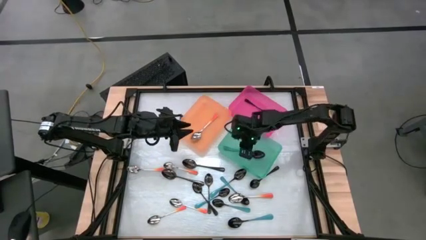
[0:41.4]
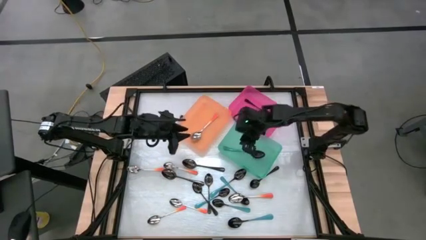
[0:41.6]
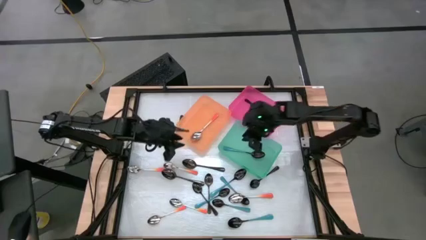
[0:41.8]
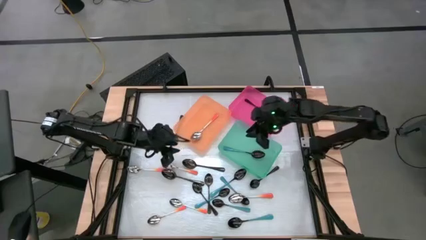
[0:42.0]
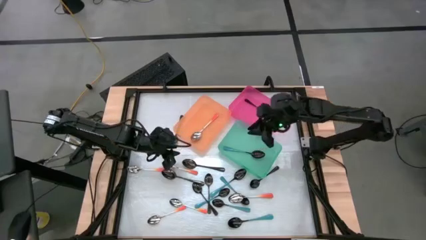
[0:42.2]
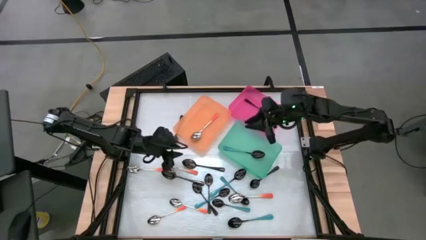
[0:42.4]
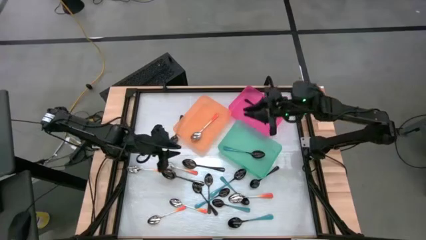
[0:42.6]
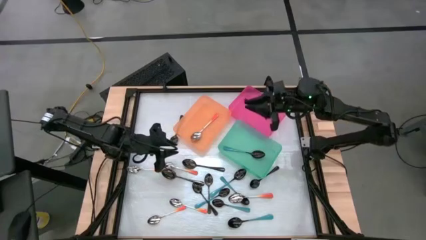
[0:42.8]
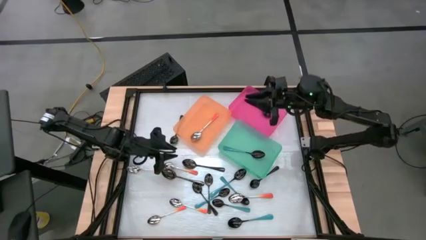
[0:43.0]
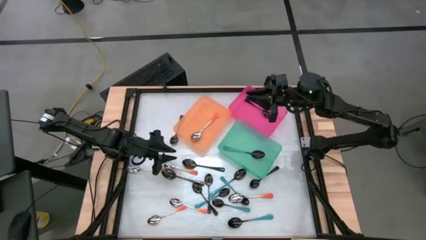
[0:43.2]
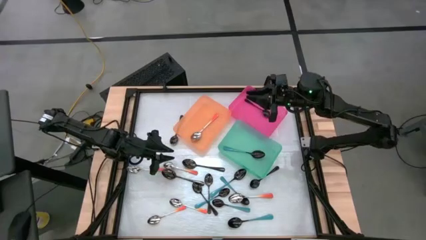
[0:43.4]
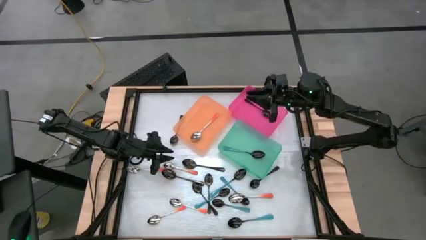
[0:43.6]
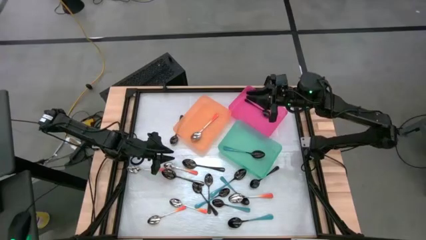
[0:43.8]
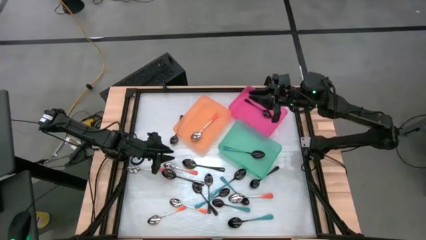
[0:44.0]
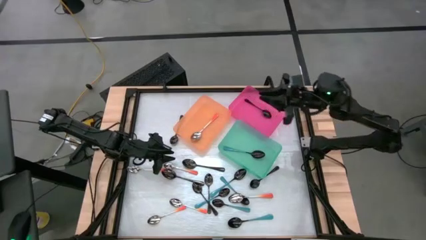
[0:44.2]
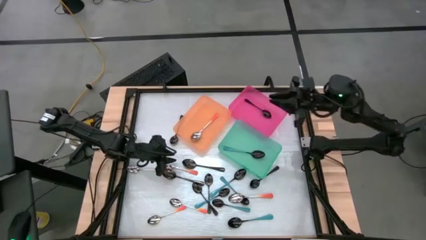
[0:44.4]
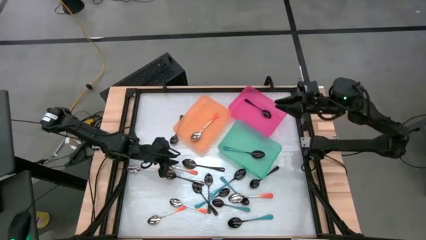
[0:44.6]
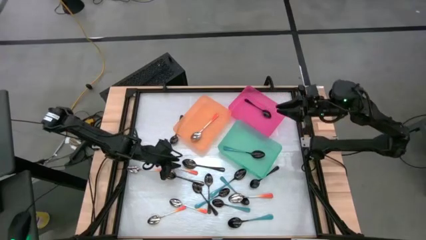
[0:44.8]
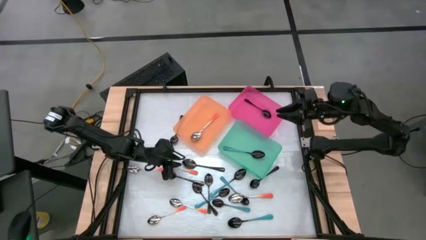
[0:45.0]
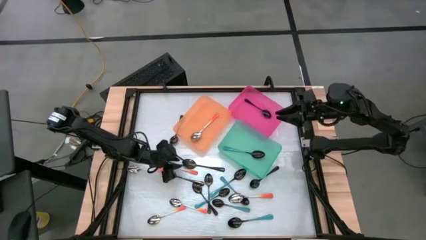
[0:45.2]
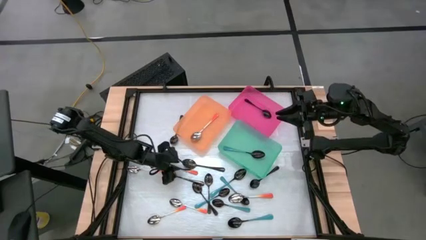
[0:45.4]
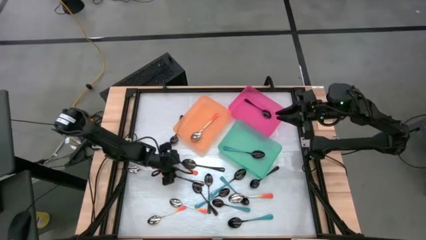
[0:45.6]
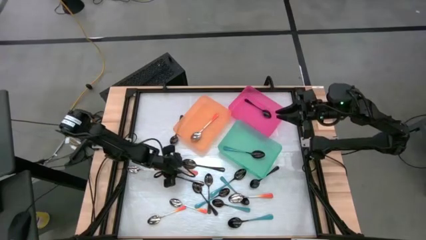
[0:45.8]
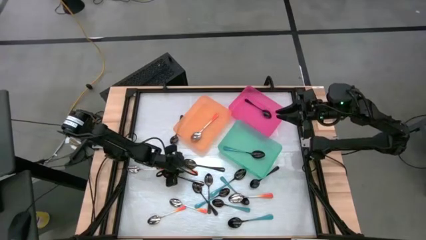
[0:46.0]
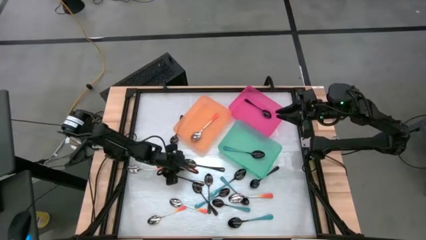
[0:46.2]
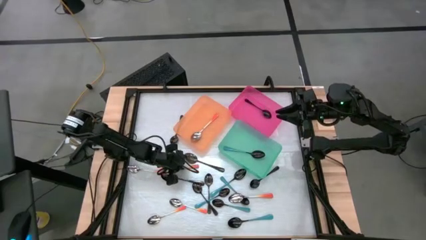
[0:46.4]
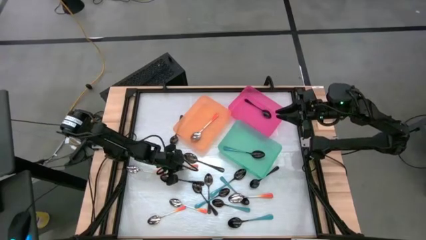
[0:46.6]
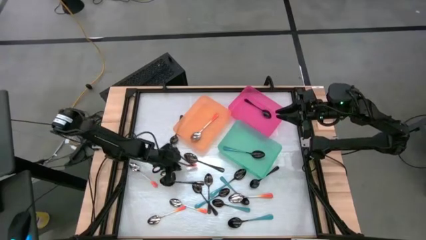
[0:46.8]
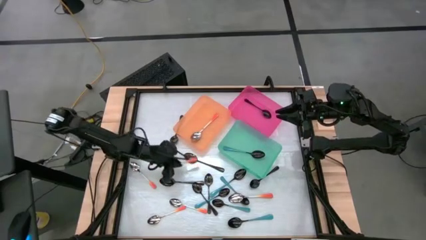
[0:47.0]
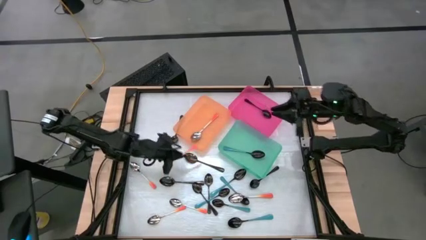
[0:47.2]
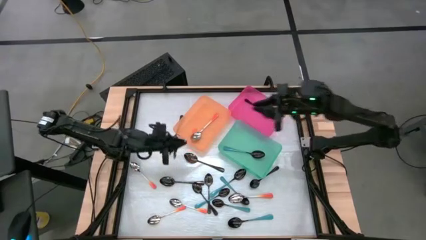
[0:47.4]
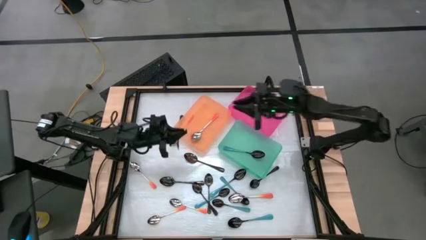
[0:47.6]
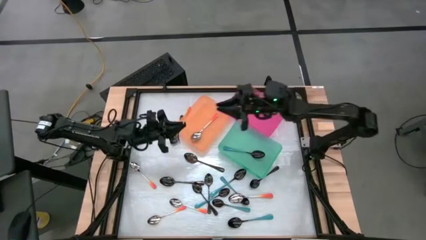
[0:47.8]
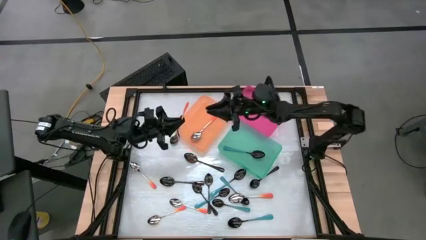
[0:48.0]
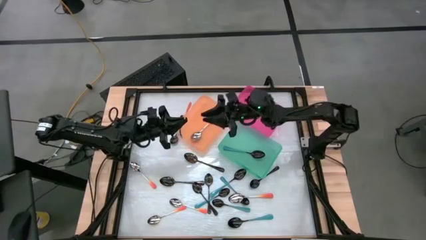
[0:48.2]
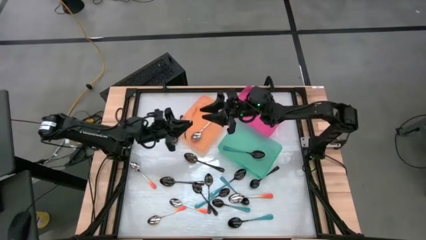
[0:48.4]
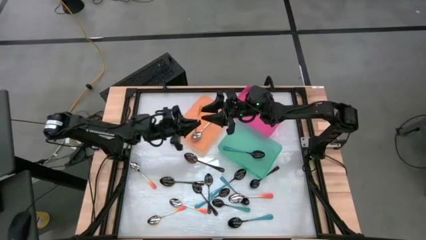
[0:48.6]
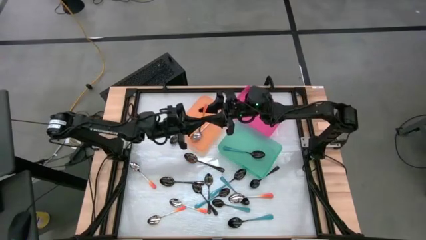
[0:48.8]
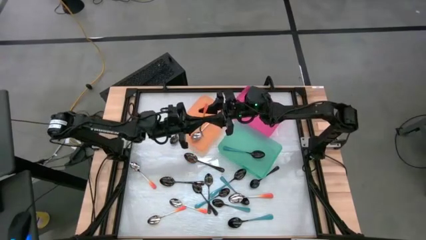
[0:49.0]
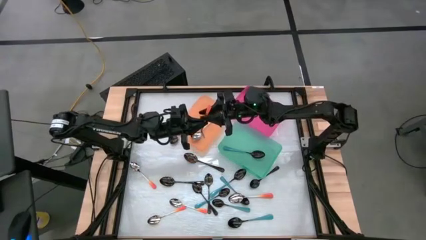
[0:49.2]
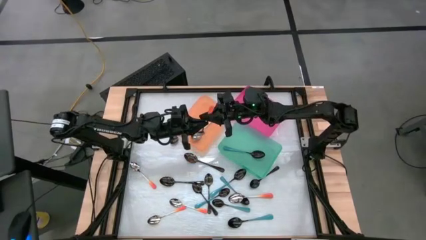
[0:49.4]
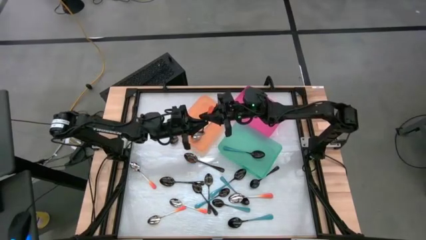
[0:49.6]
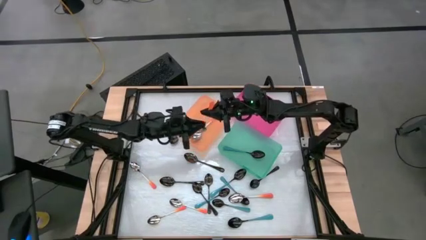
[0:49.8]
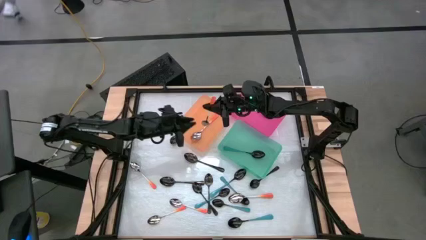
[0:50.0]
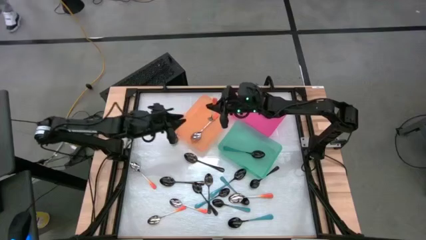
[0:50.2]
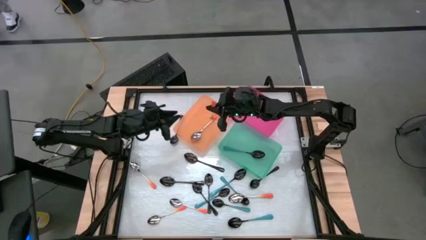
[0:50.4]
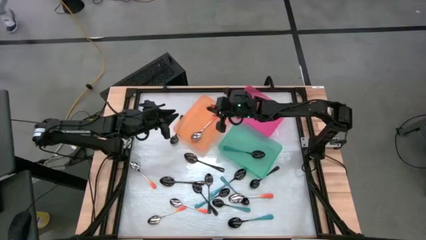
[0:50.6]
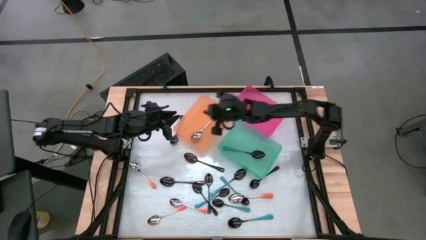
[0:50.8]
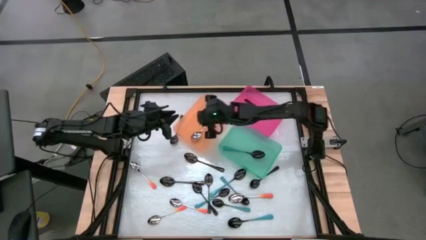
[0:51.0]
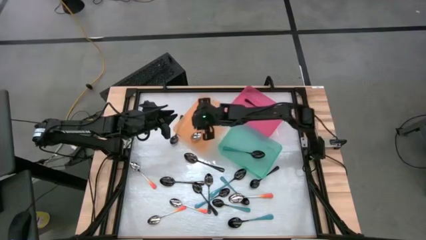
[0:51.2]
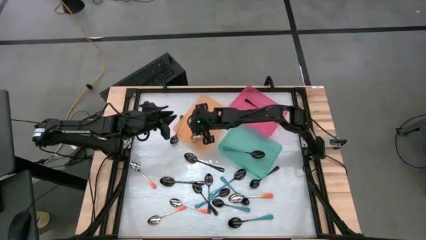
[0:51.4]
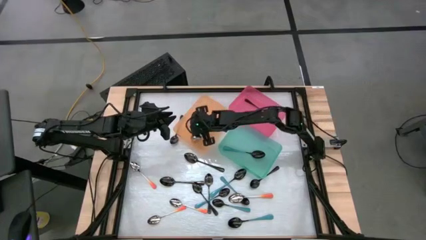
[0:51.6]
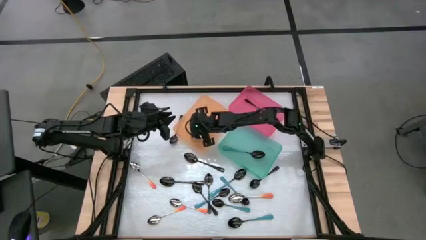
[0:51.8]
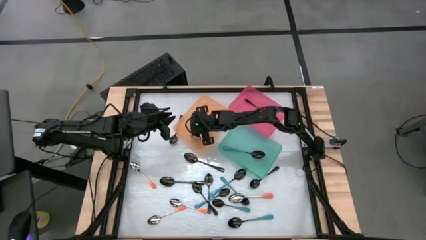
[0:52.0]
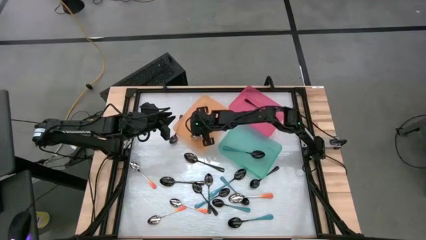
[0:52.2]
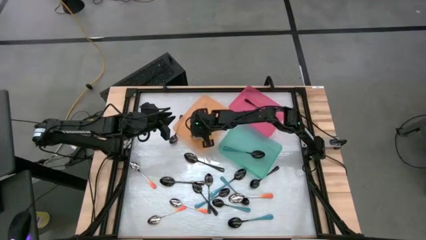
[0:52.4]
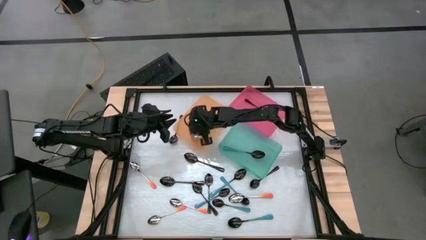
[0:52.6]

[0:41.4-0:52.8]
Task: Sort silverware by color (type)
Put the orange spoon into the orange bin

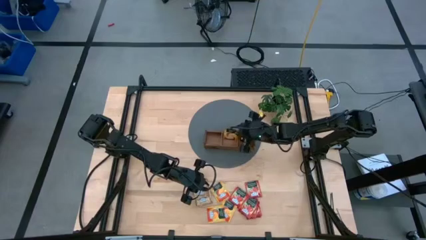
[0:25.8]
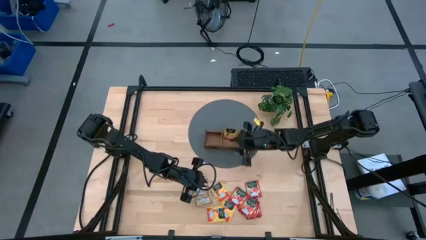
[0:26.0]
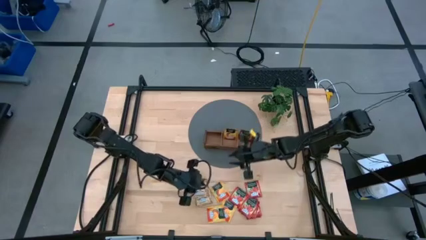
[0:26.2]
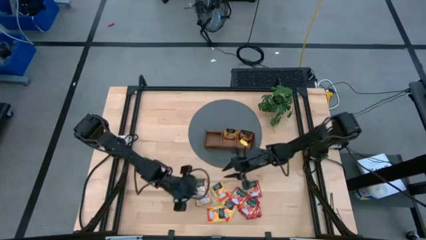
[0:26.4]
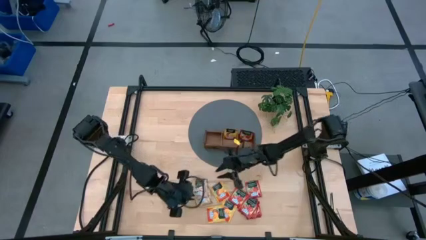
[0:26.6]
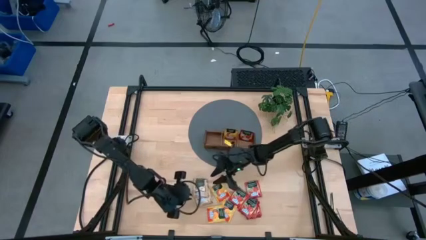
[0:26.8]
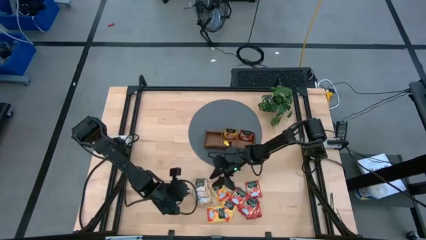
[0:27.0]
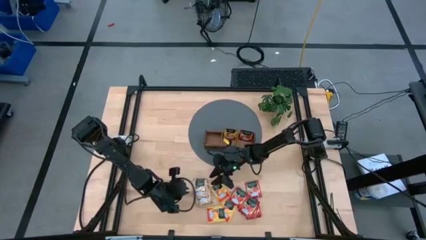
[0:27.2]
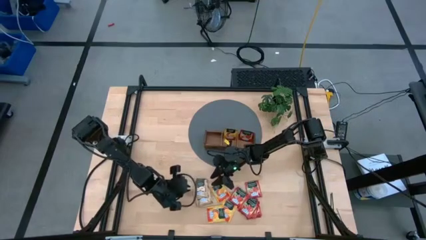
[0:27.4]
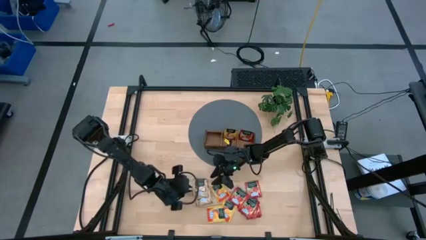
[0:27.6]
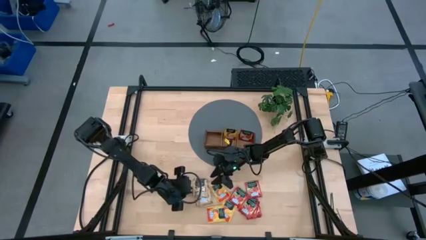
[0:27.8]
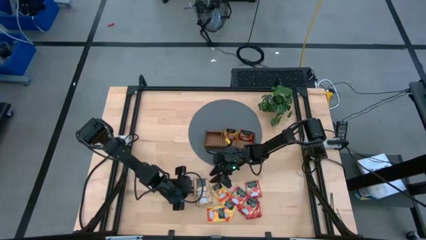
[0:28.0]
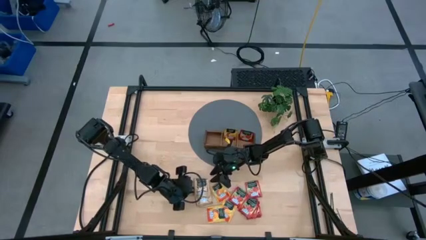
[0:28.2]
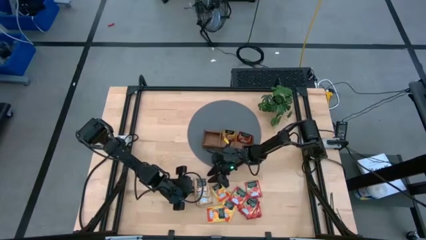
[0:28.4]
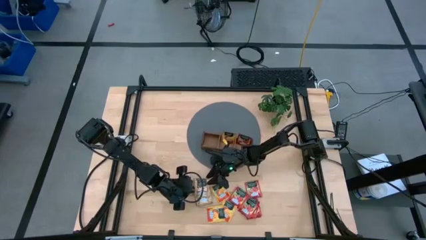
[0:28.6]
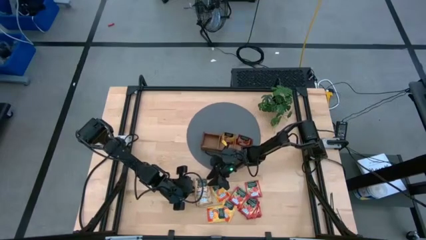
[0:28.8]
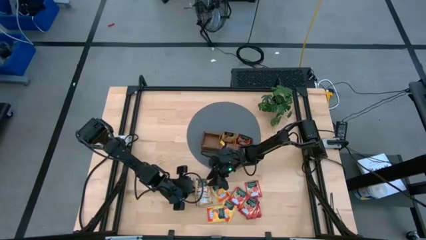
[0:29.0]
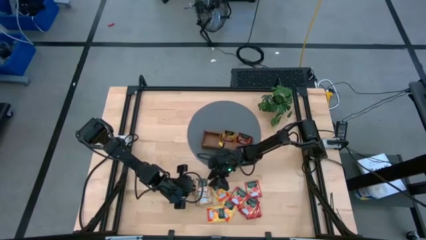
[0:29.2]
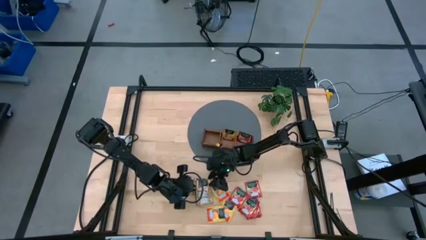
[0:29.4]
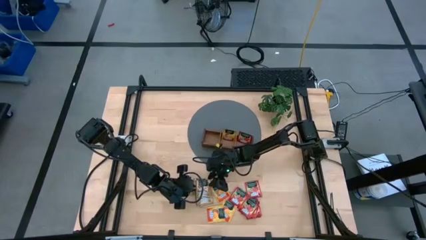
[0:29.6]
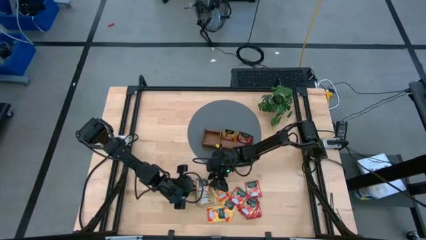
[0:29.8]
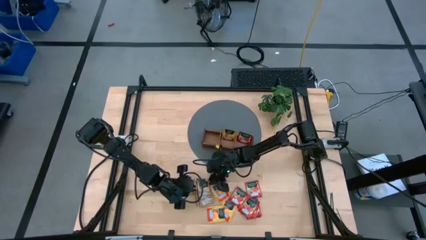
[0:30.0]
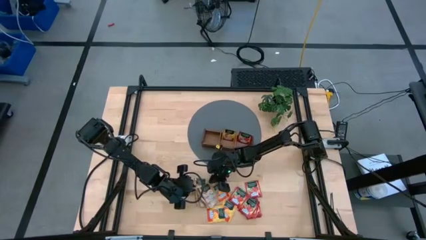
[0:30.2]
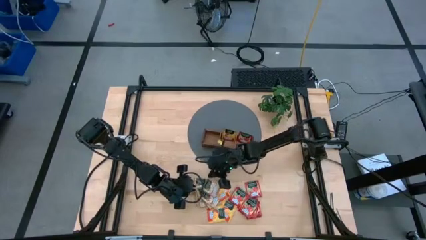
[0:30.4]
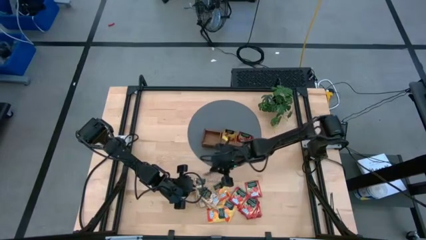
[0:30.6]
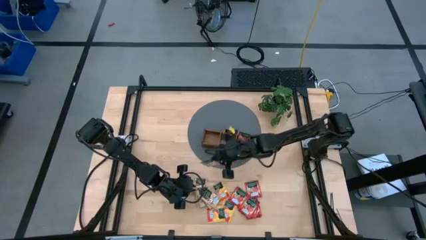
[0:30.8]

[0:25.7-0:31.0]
Task: Pick & Place Tea
Put the brown tea packet into the left section of the wooden organizer
